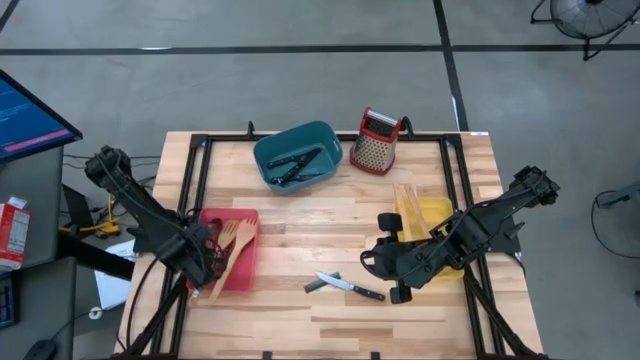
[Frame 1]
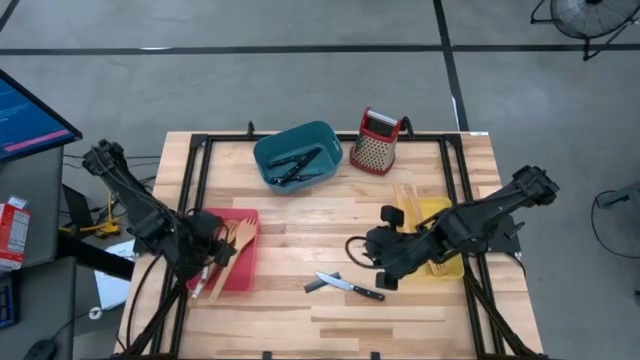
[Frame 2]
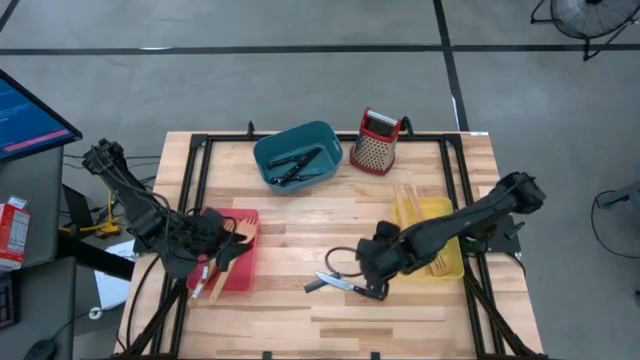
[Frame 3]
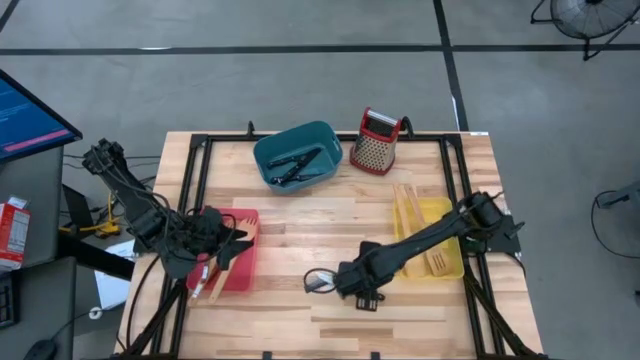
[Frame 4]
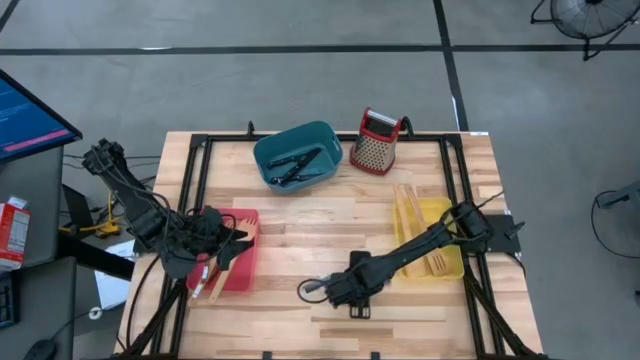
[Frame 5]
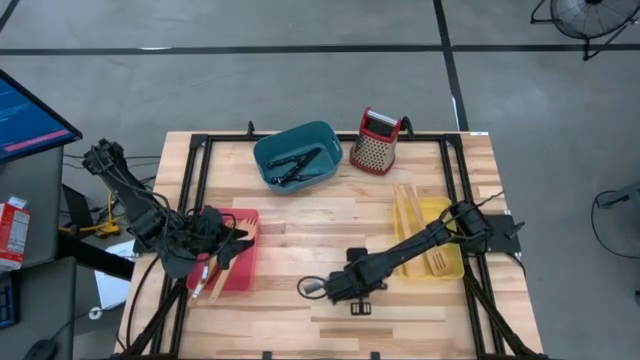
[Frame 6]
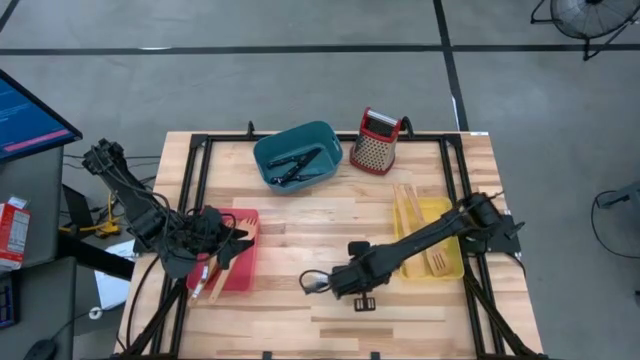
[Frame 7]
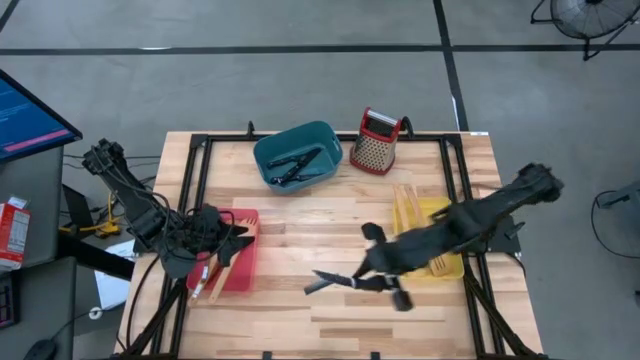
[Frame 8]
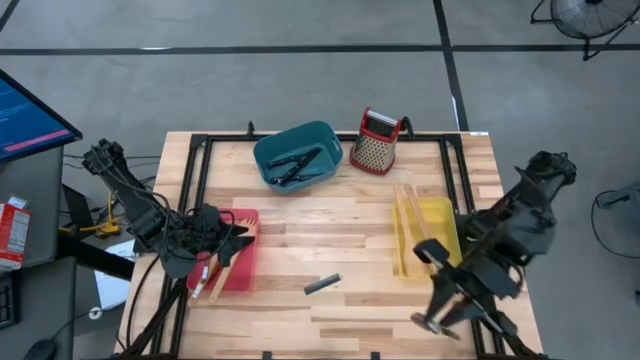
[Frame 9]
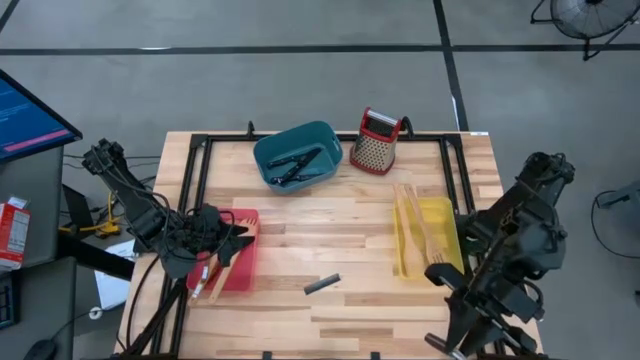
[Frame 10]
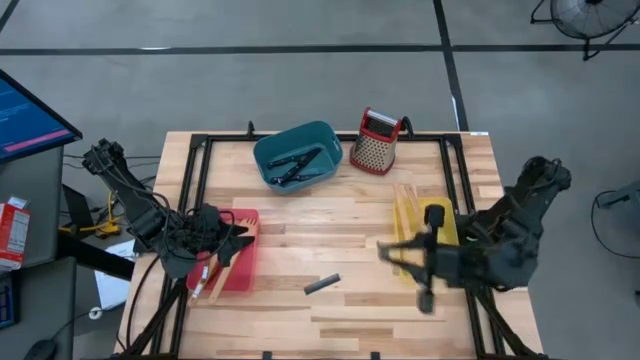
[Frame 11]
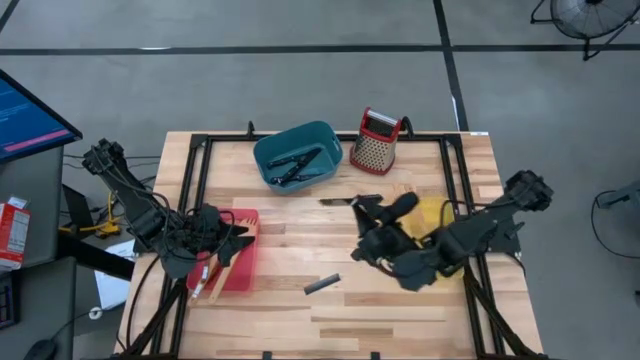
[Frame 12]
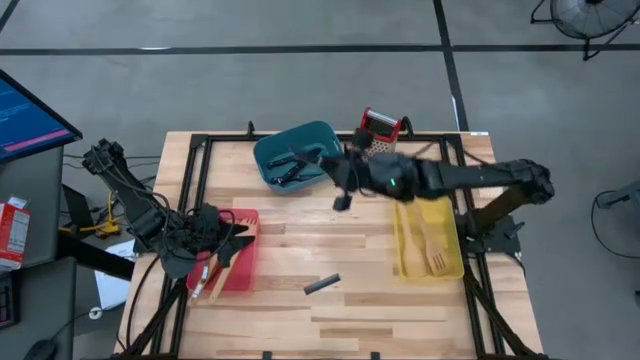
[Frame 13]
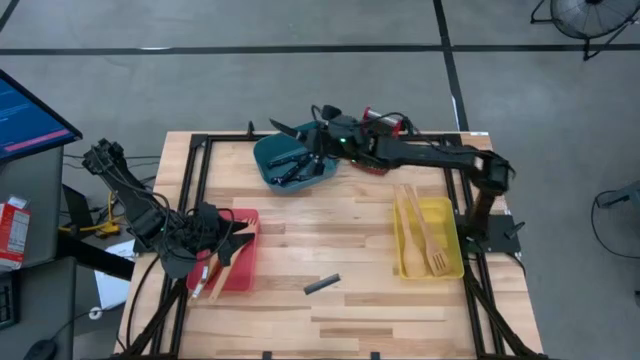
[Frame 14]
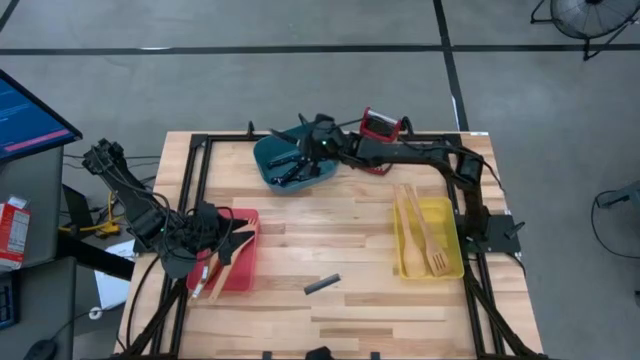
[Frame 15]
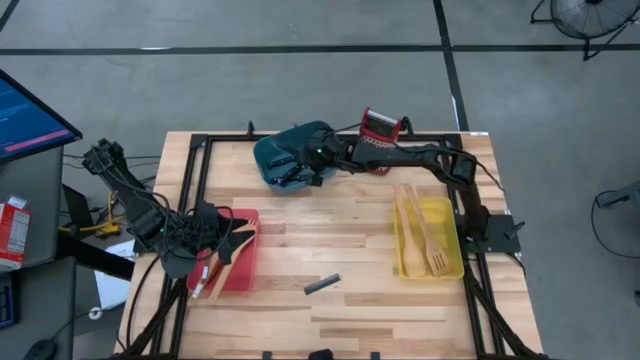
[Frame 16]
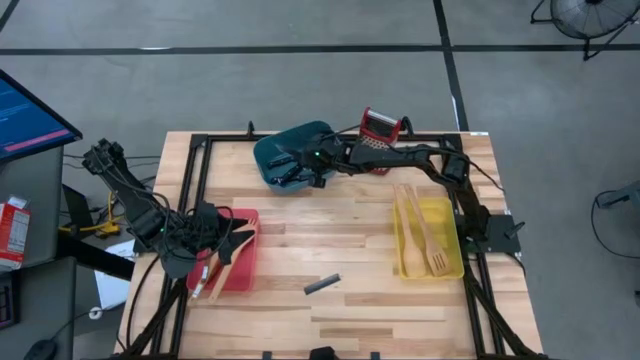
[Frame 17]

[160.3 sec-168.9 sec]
Task: Pick & Place Kitchen Items
Put the black table knife into the blue bin

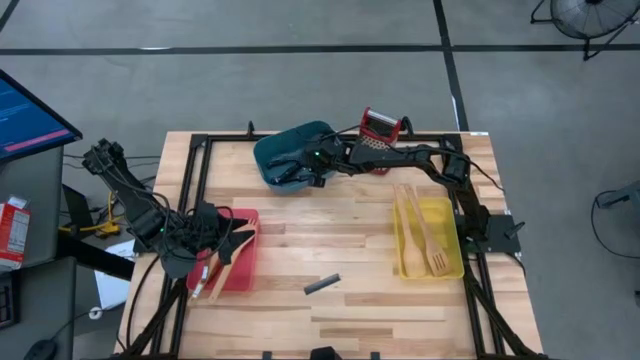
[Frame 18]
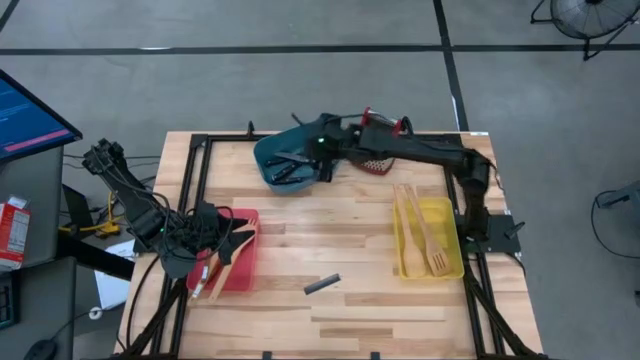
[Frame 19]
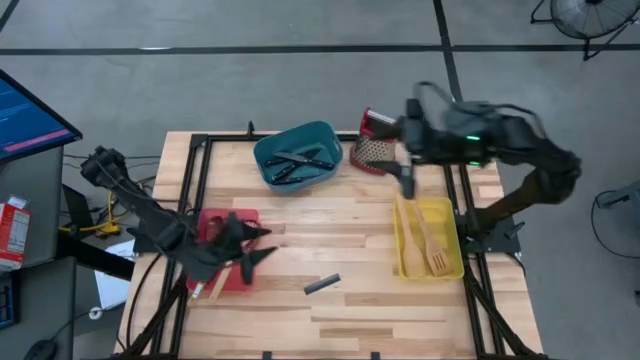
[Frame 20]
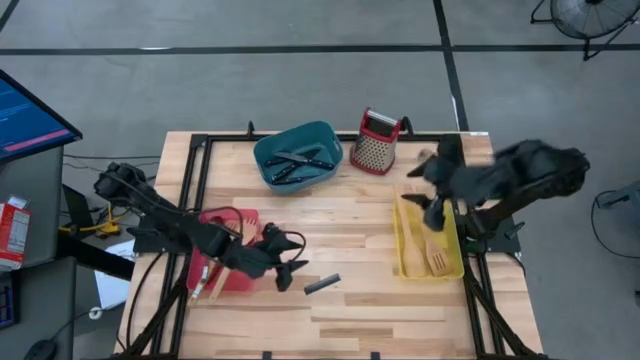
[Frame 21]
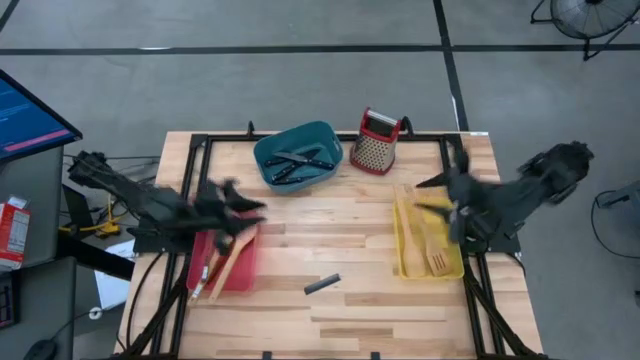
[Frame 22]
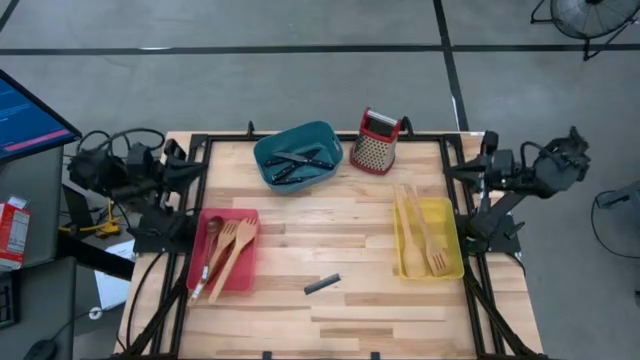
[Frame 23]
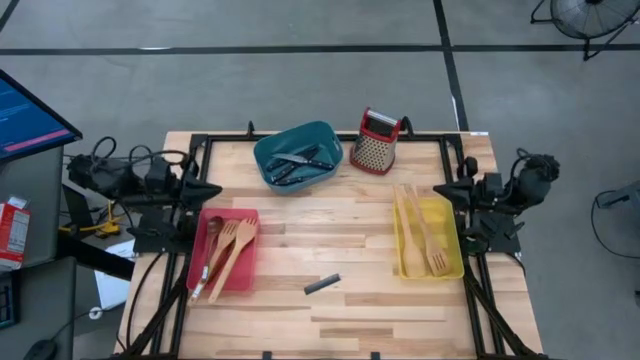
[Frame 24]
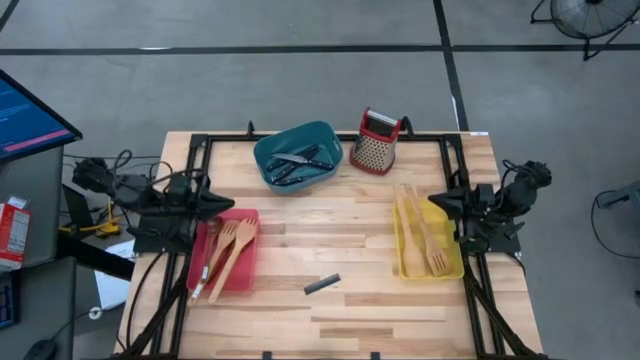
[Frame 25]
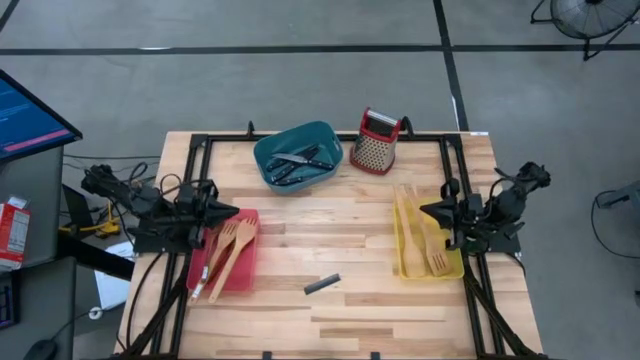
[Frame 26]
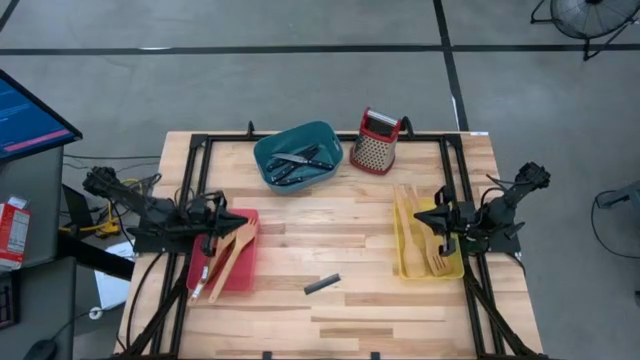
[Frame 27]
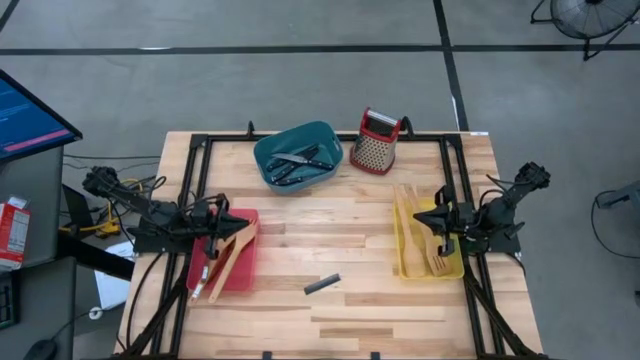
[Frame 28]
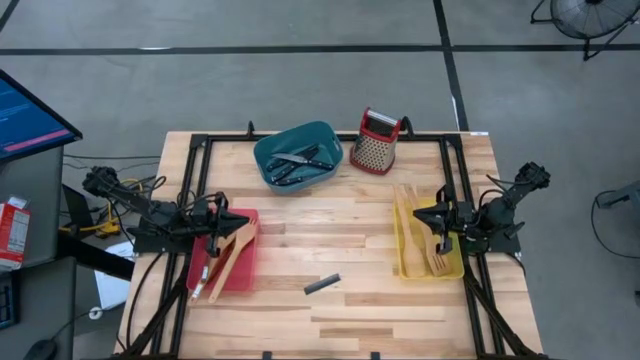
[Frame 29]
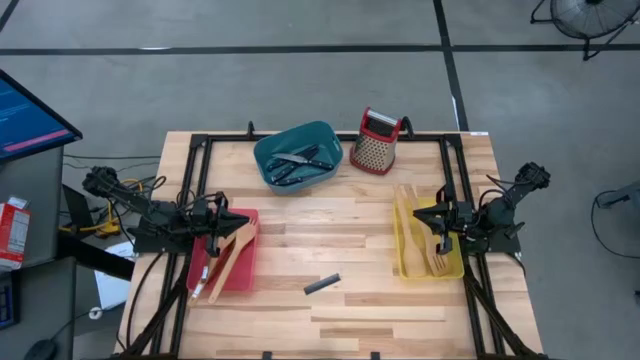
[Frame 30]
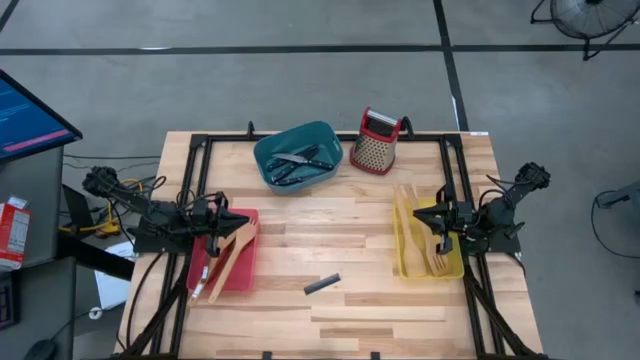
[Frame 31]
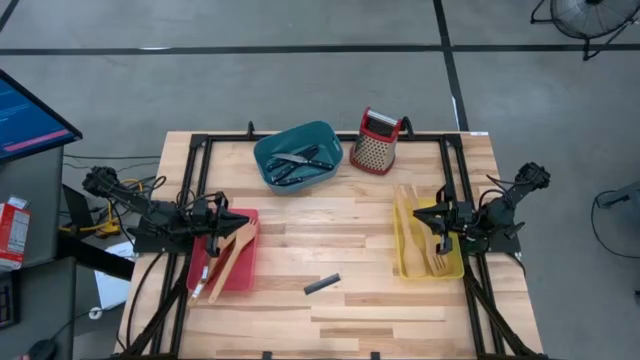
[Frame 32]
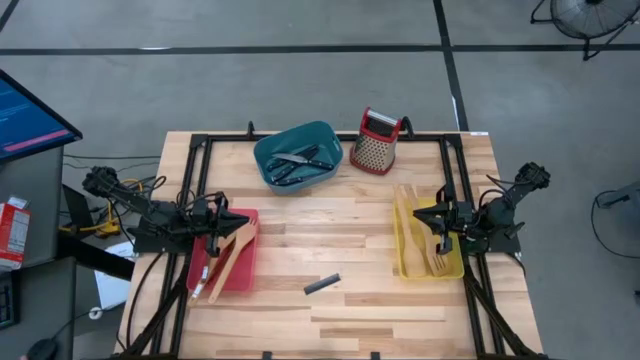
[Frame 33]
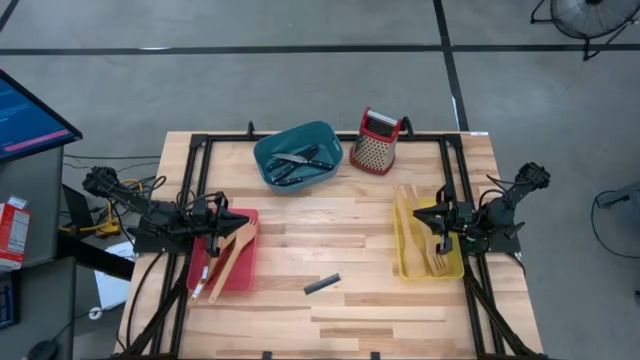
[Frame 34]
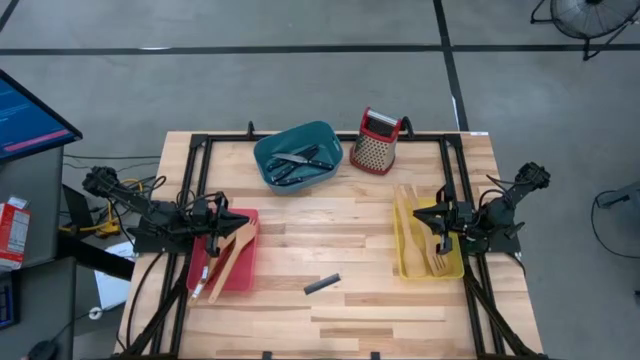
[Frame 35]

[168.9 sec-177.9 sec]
Return to Home Position
